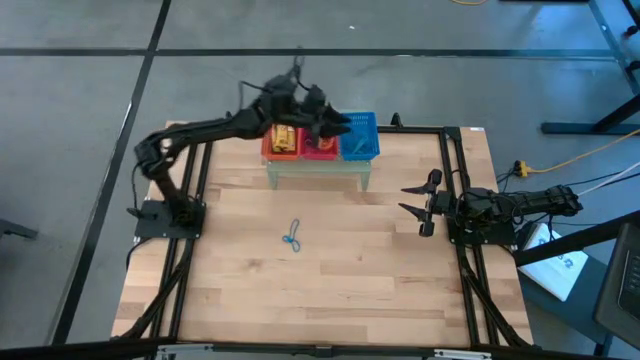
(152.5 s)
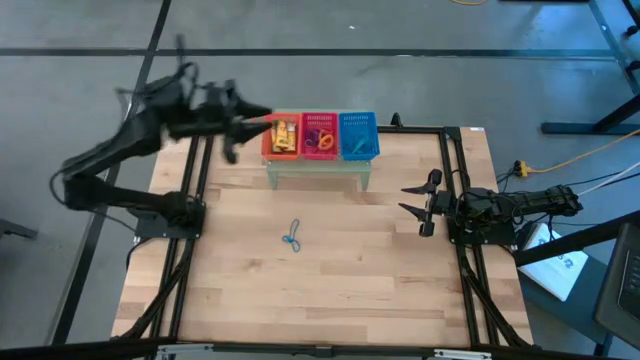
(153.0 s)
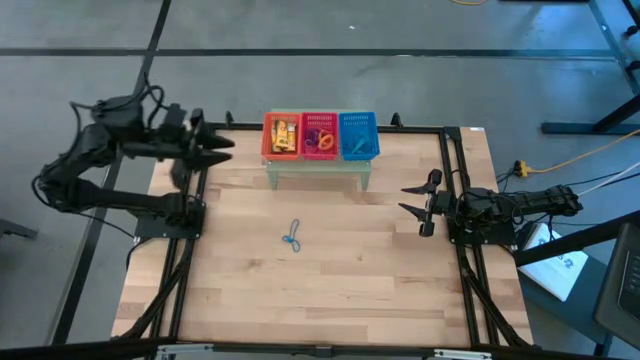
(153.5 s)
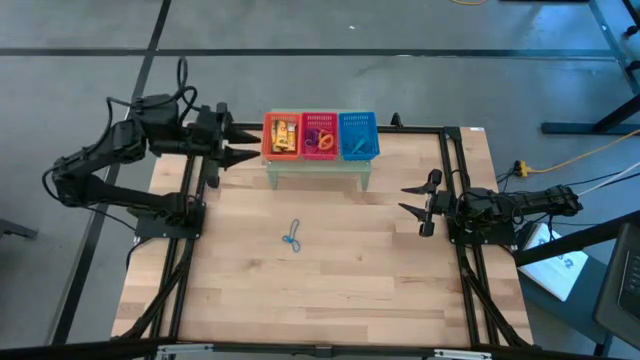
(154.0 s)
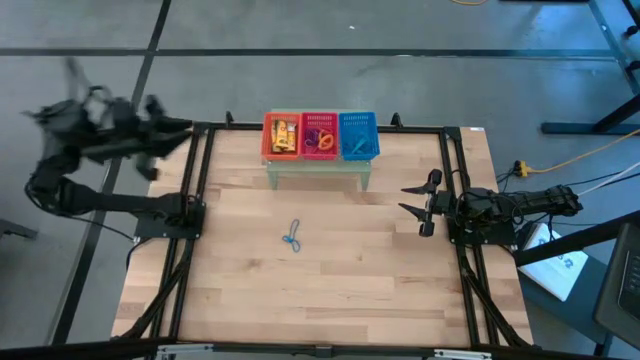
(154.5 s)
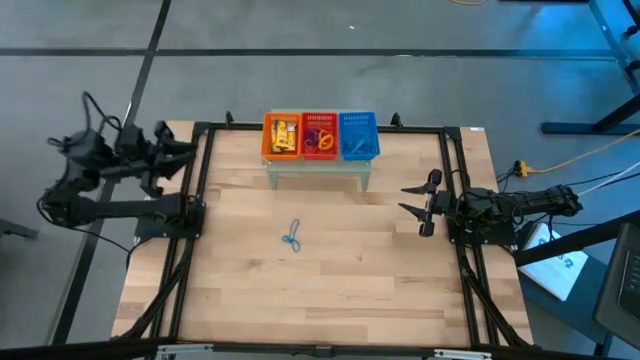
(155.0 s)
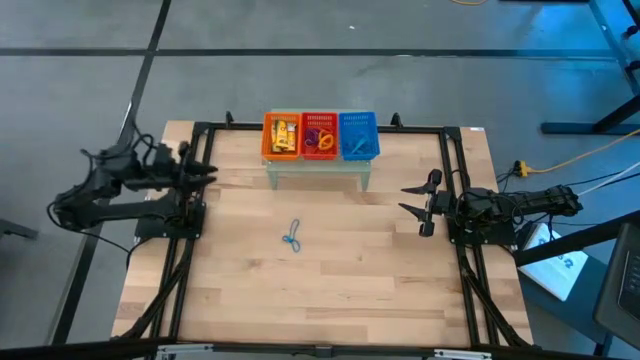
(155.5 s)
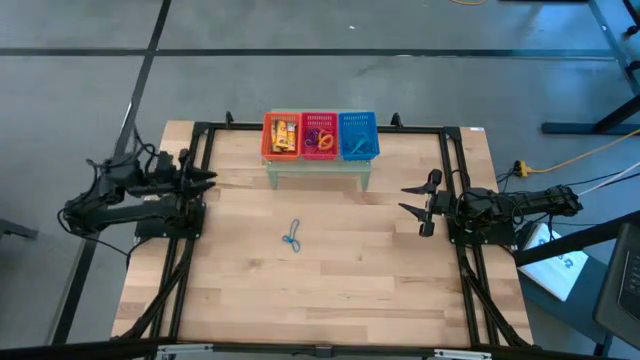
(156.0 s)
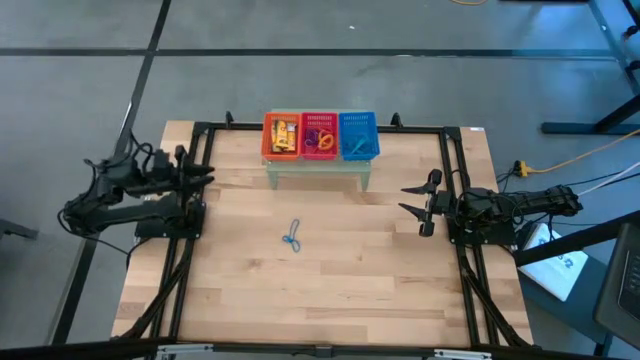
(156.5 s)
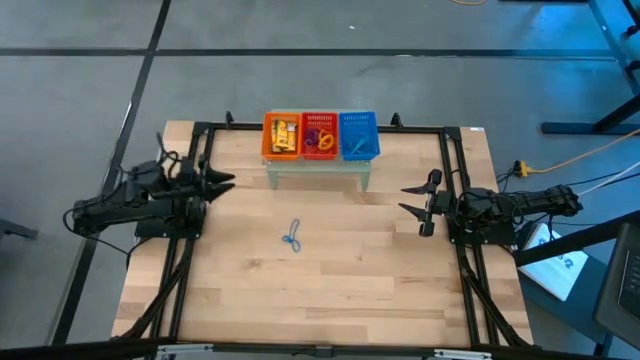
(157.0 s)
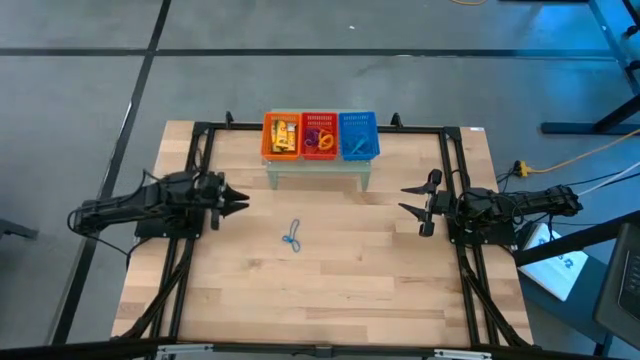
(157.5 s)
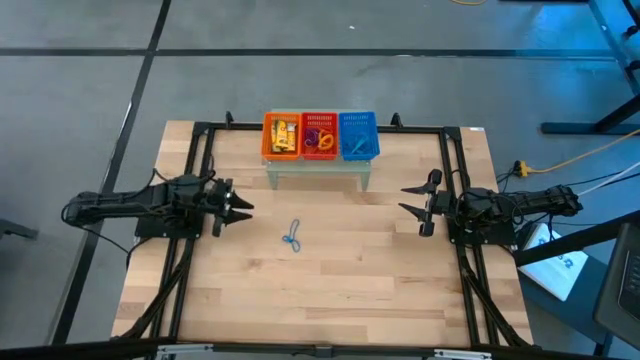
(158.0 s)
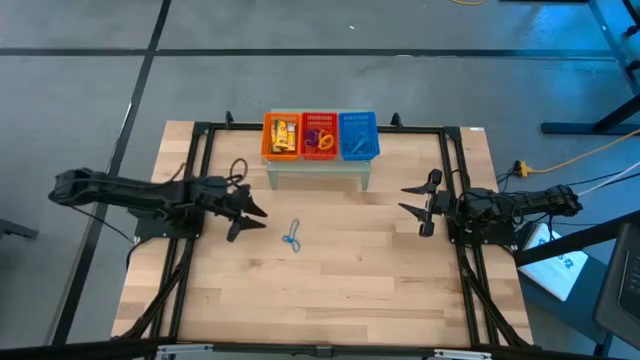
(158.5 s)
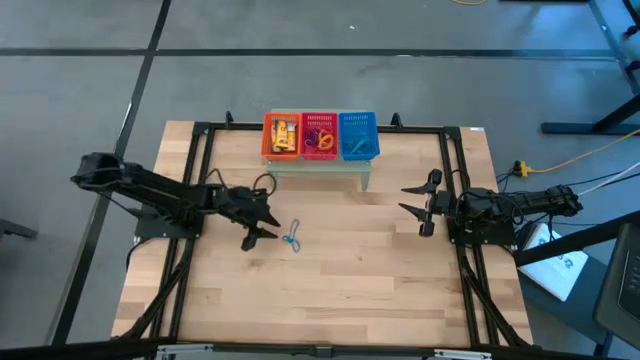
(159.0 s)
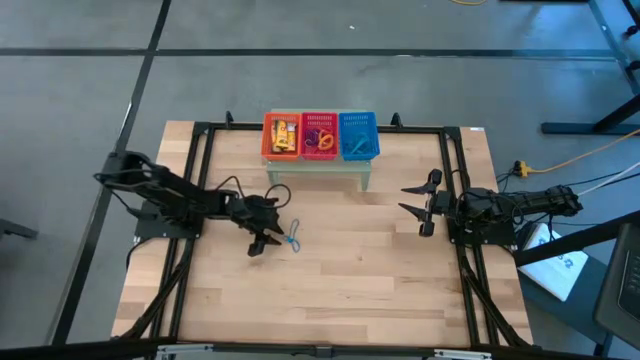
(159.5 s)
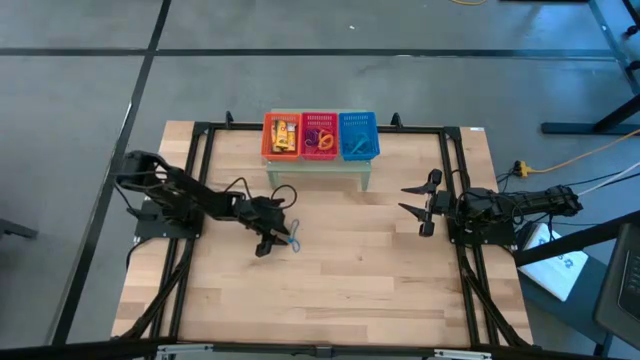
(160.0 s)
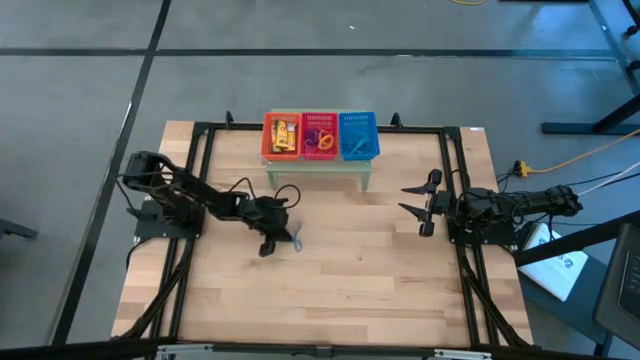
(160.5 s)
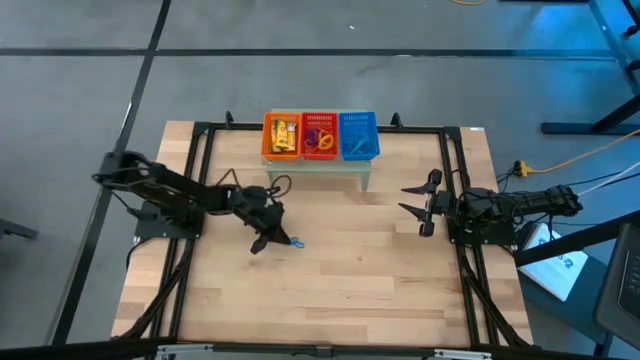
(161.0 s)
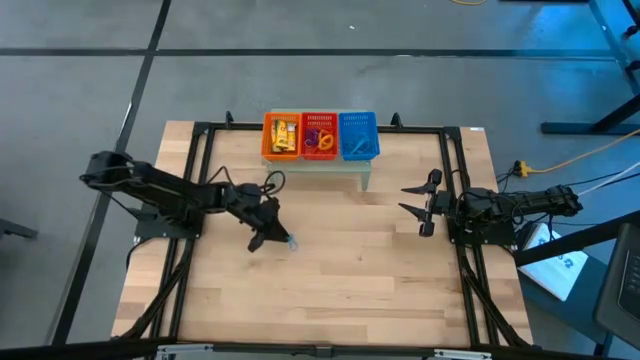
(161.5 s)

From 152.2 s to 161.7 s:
Task: Pick & Place Office Desk Supplies
Put the blue rubber band into the blue bin on the shelf

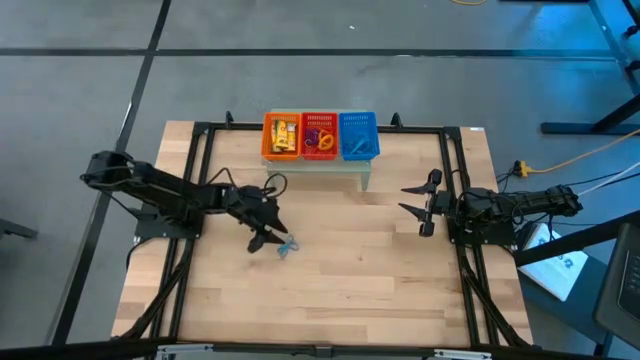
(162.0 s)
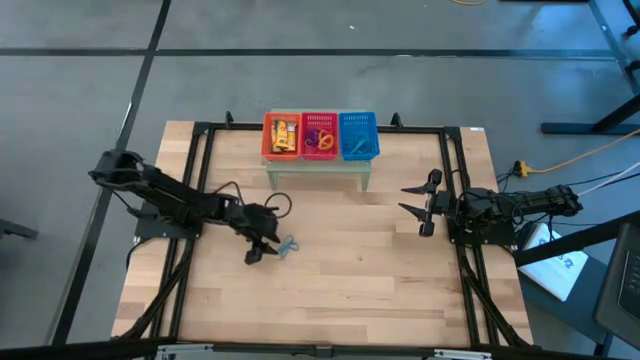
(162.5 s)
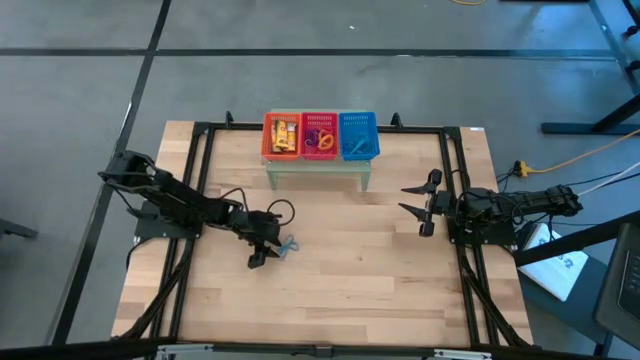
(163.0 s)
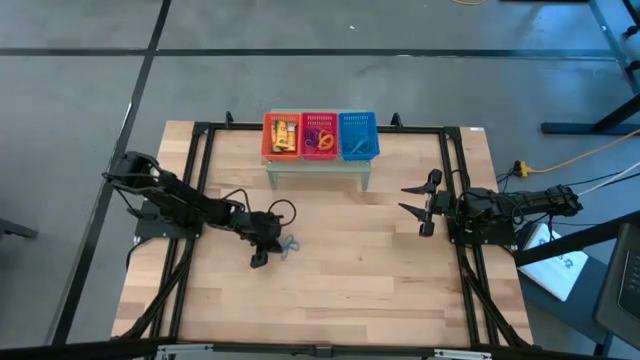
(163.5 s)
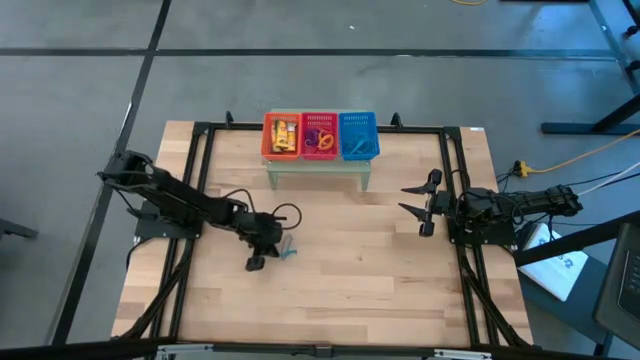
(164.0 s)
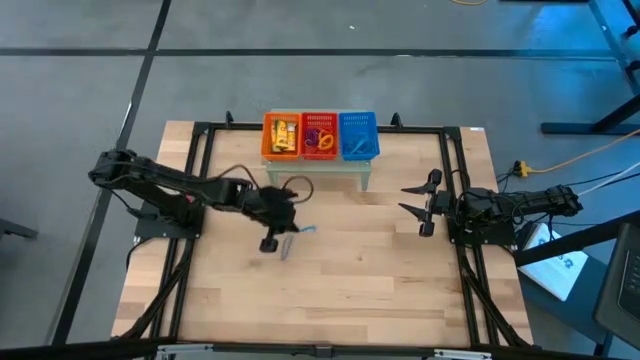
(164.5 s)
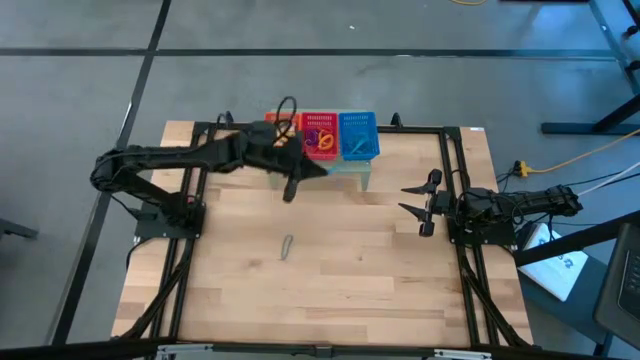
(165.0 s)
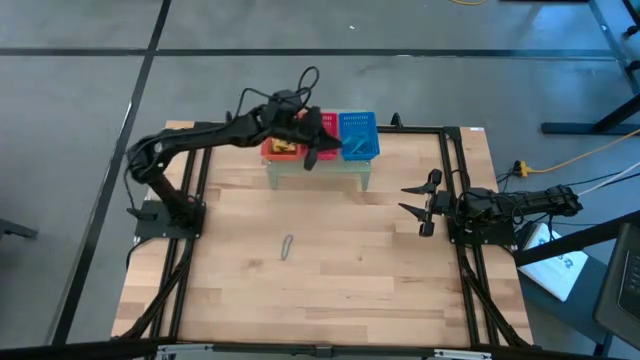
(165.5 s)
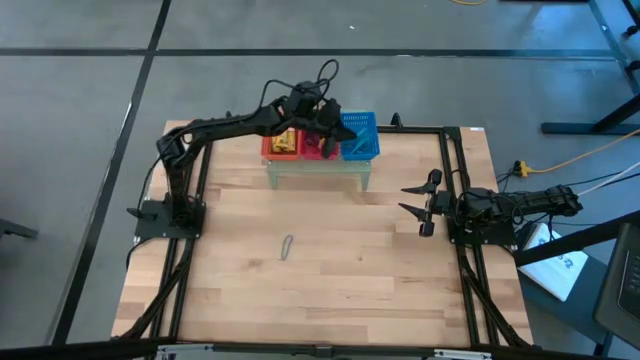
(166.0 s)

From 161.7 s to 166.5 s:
Put the blue rubber band into the blue bin on the shelf

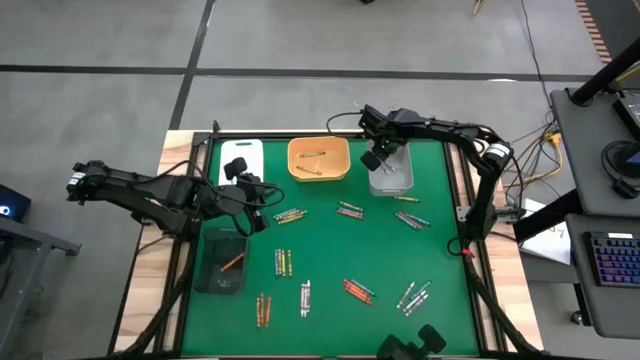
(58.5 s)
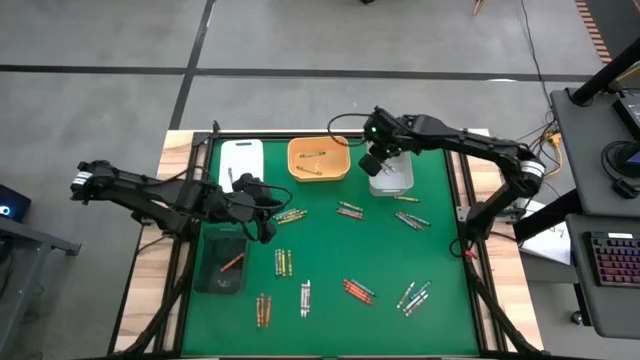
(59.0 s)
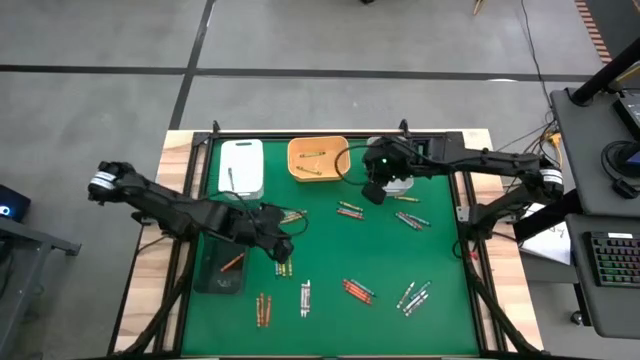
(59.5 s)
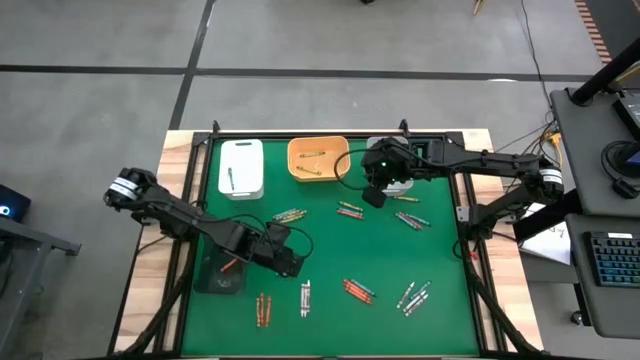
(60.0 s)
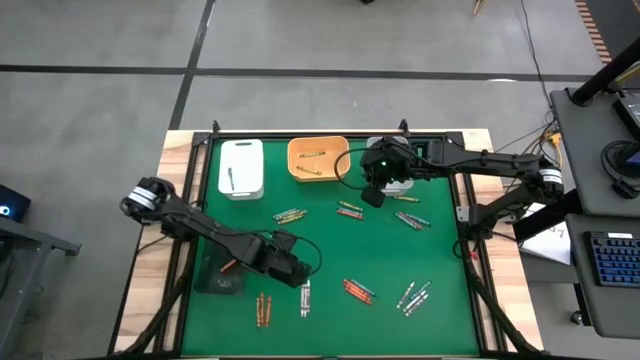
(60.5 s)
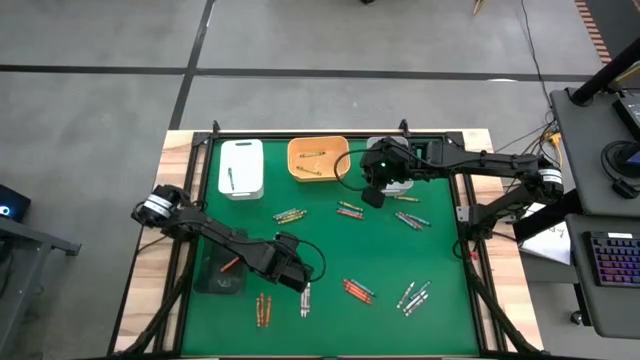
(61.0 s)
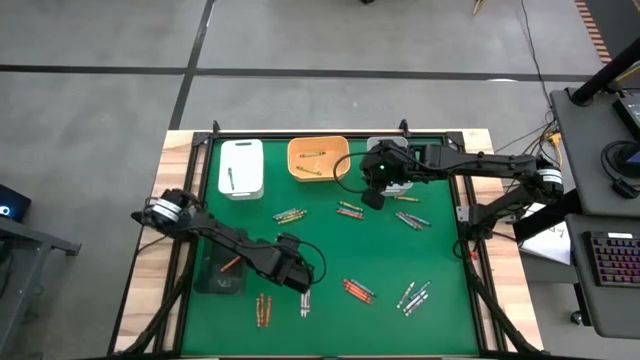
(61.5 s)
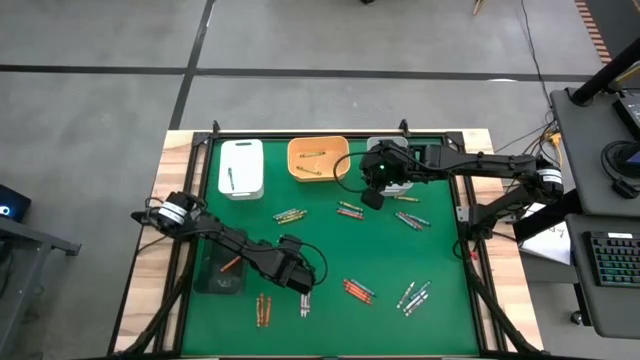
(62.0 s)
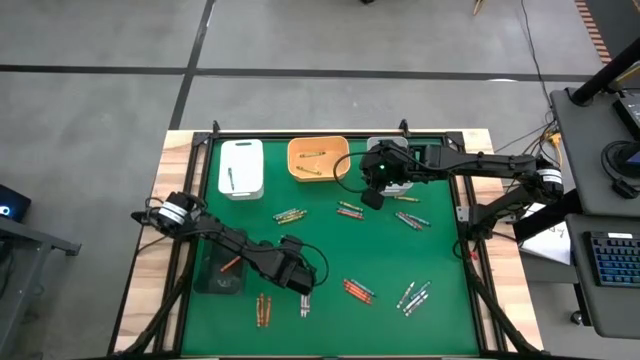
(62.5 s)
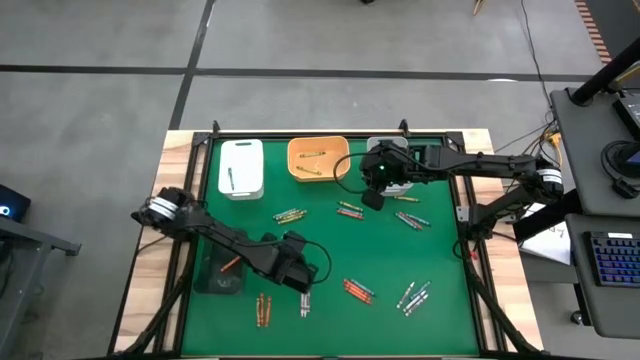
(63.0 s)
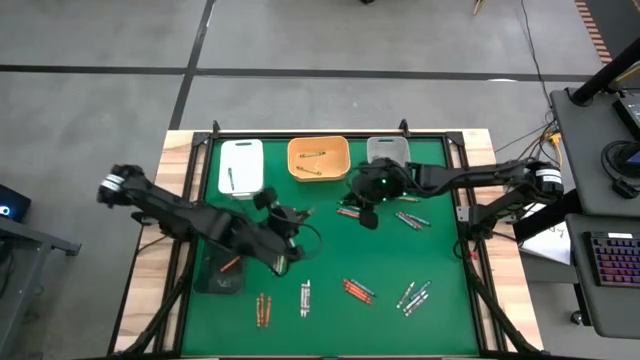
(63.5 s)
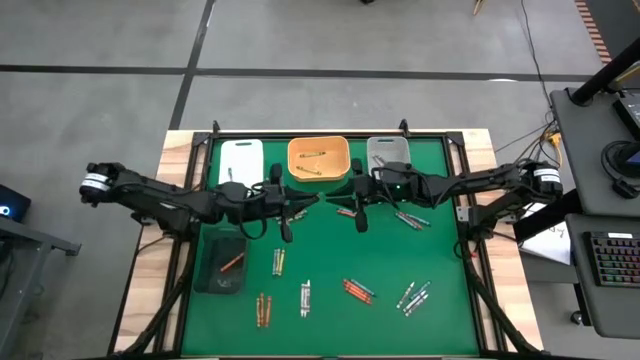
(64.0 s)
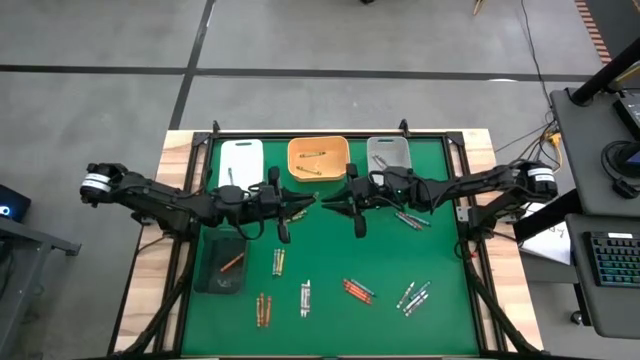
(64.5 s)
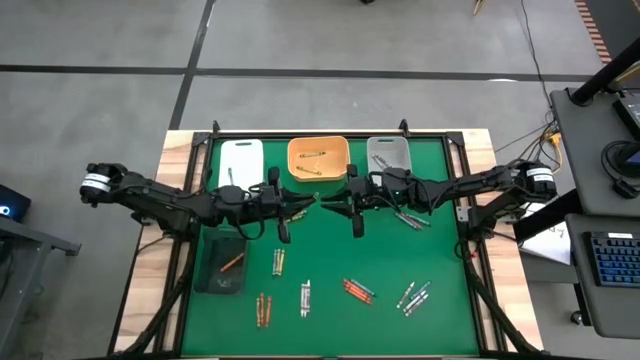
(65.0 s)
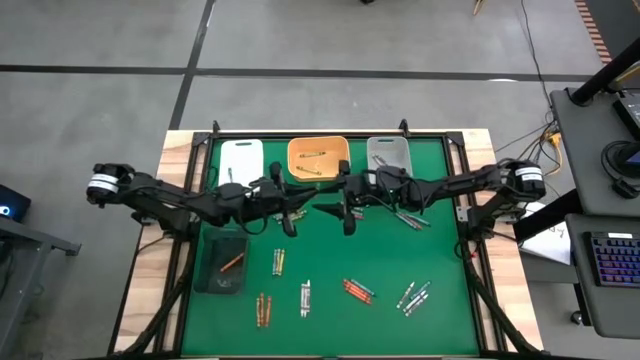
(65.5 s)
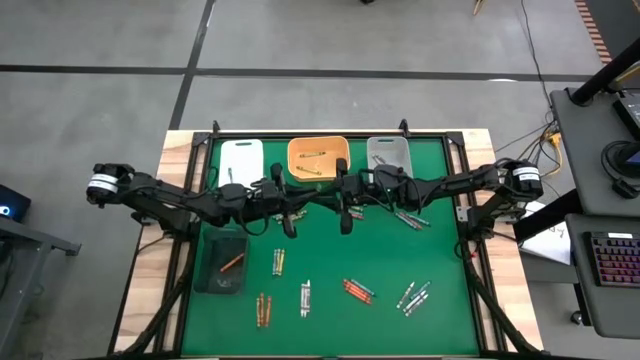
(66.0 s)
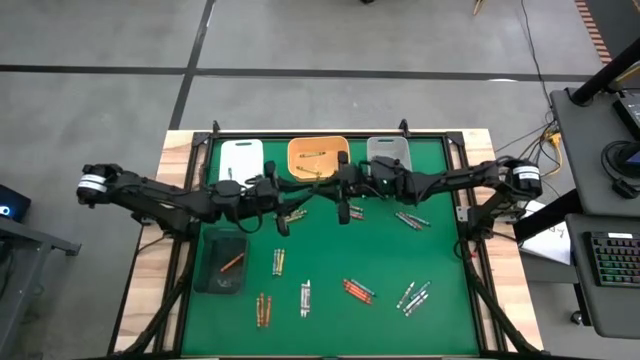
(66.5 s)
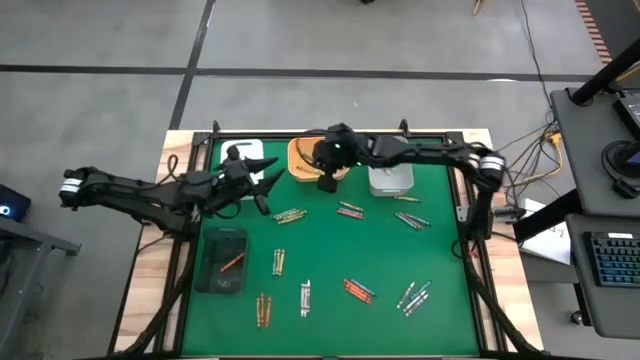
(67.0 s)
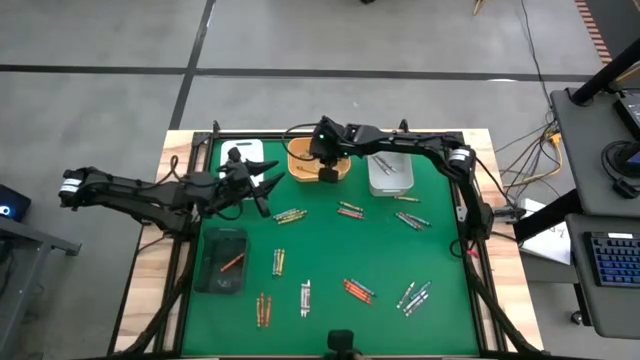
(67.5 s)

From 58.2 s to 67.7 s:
Task: Sort crayons
Put the green crayon into the yellow bin
